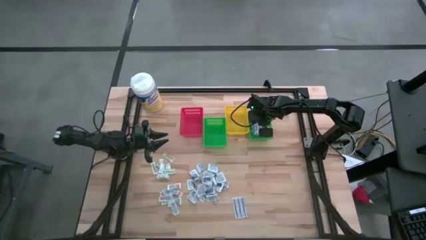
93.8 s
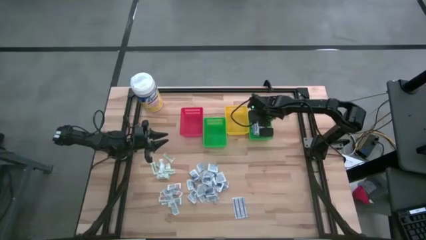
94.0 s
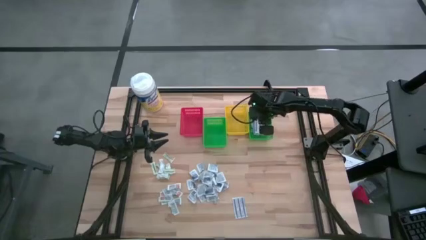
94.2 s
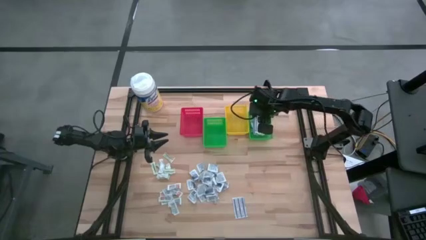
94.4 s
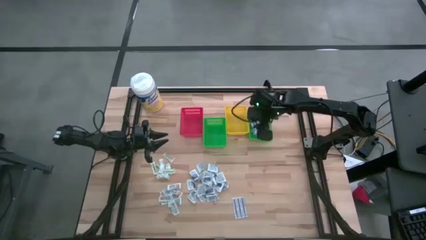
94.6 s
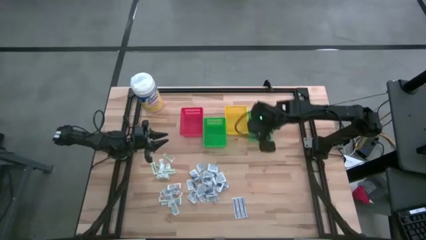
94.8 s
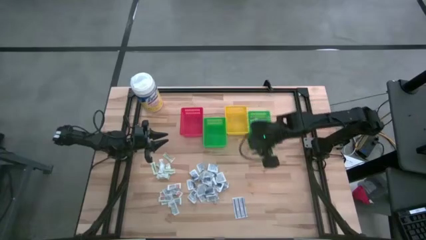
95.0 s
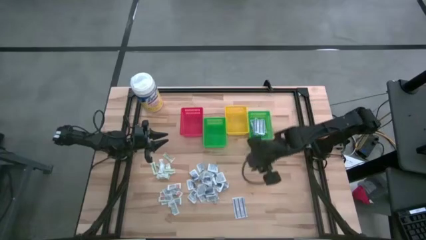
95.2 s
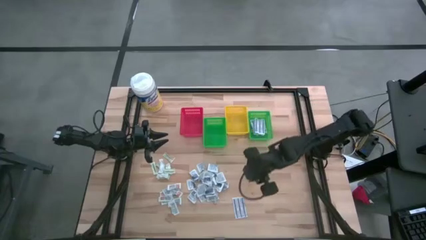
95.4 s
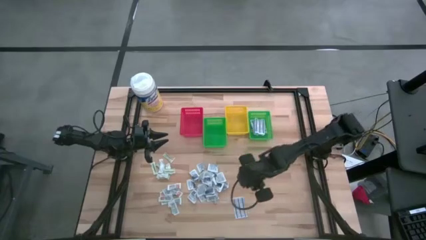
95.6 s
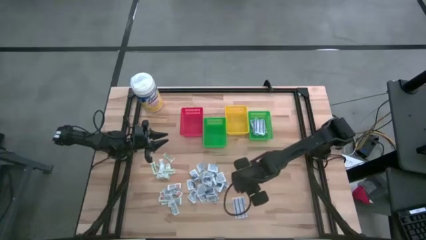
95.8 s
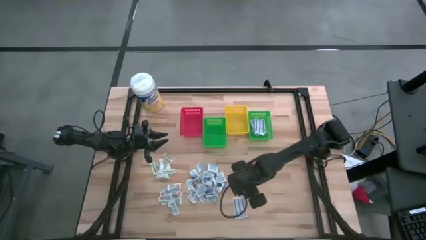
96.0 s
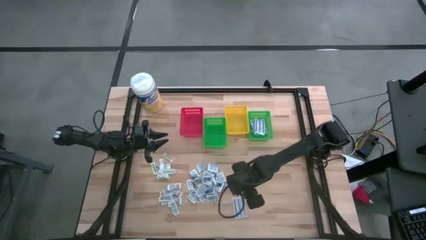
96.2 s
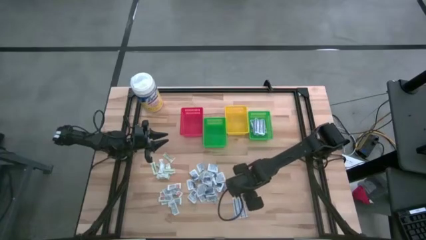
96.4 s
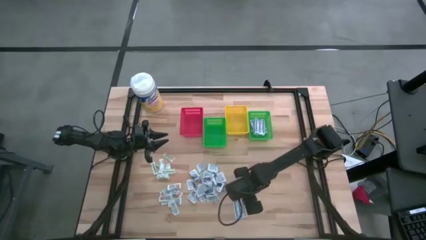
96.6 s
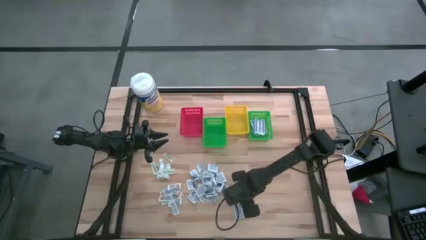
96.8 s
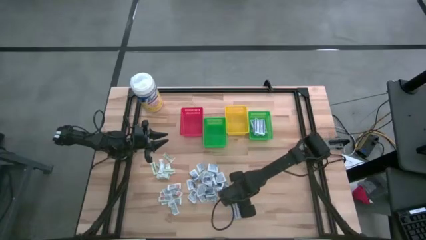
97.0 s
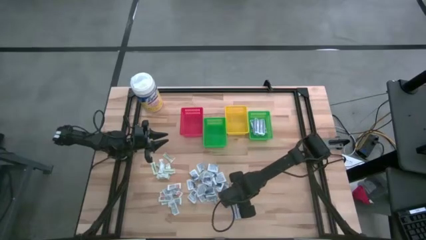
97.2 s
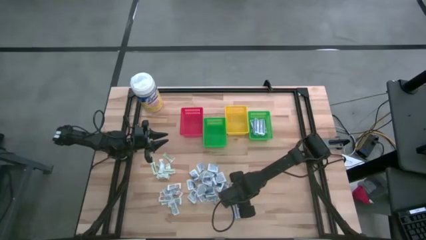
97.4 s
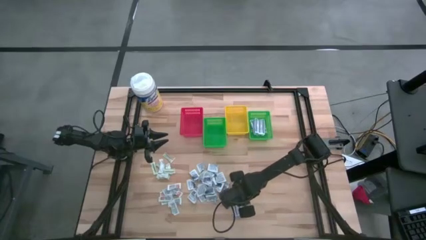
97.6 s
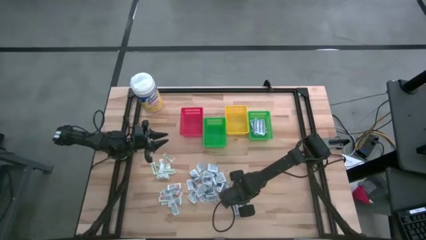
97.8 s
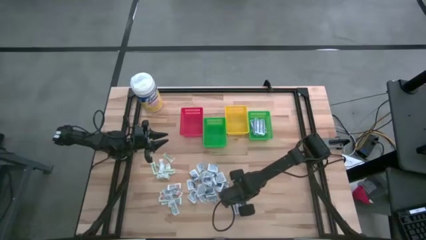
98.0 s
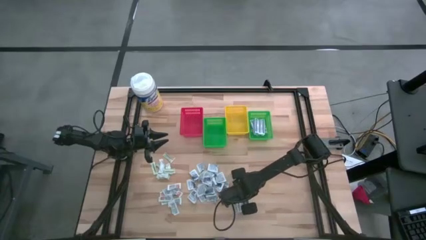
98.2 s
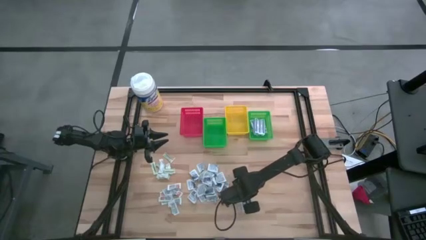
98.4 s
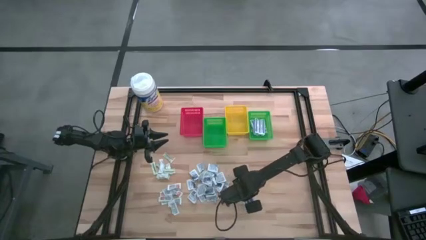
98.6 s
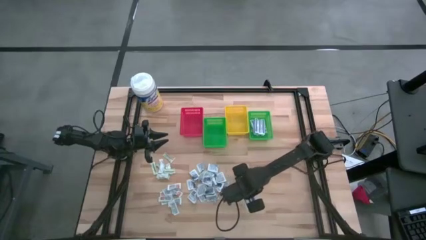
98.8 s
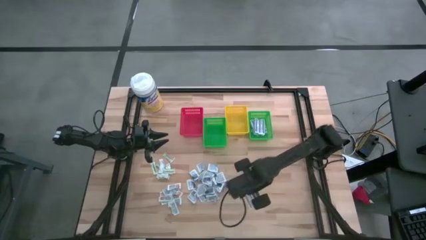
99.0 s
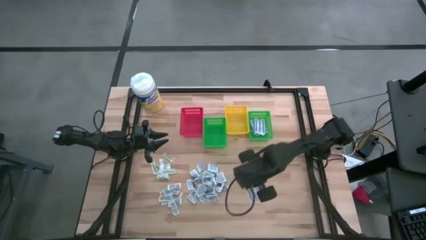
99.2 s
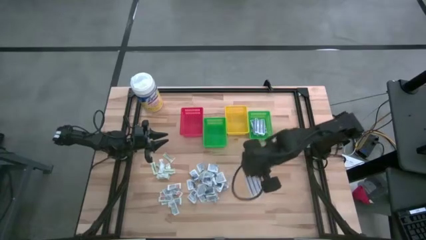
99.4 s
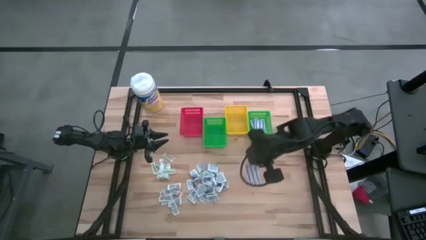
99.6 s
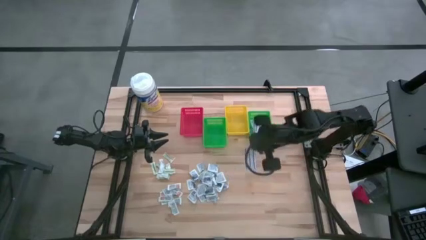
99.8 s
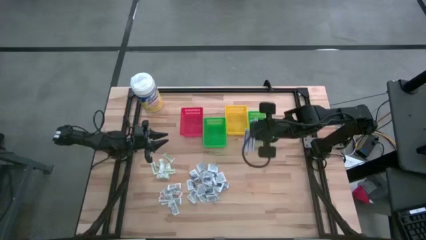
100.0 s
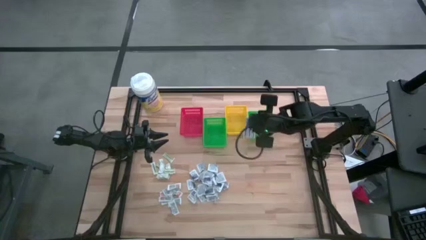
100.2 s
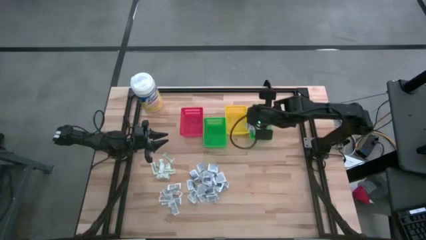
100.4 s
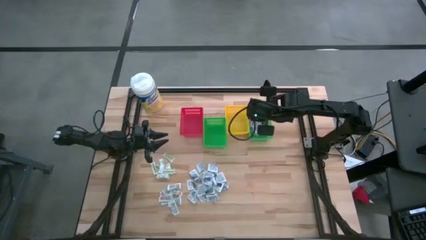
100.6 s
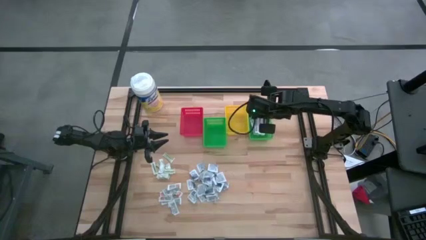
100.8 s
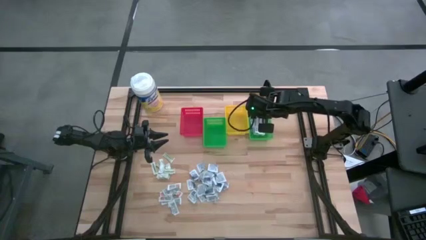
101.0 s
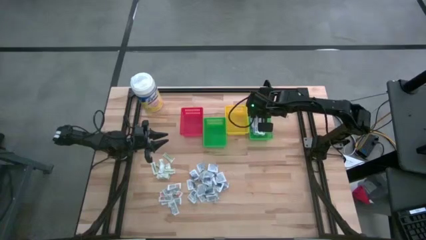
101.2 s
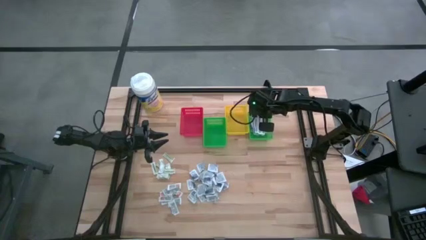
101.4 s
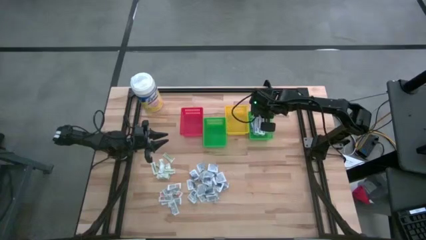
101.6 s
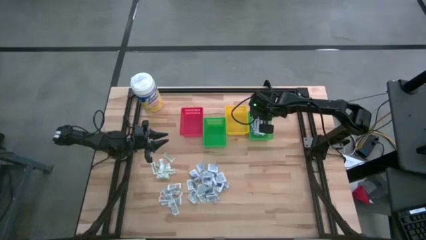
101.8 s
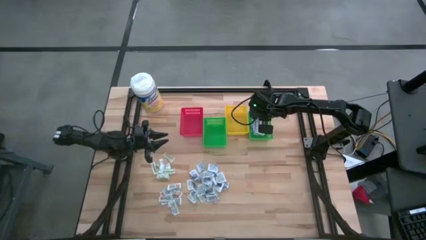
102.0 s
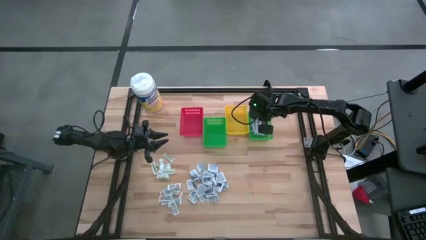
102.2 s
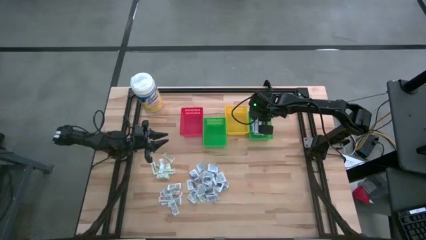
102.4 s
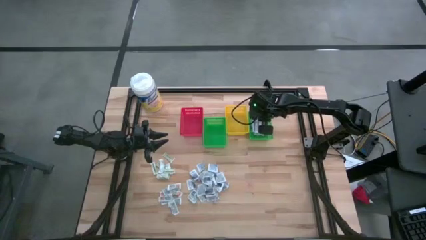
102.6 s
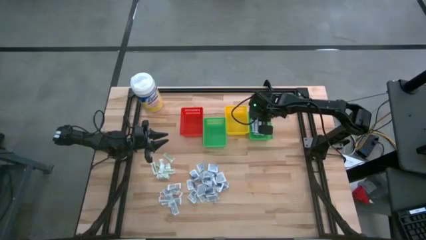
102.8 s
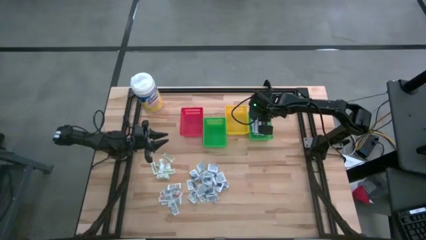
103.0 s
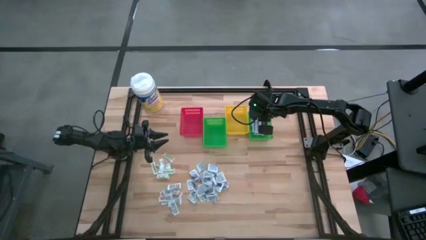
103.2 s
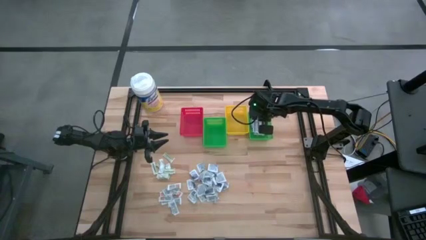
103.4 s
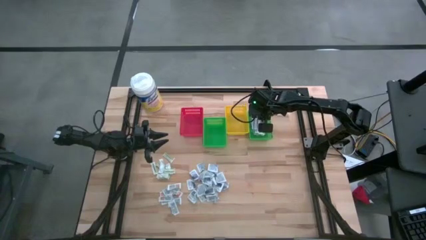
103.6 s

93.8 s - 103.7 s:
Task: Pick & Place First Aid Supplies
Put the blue bandage into the right green basket

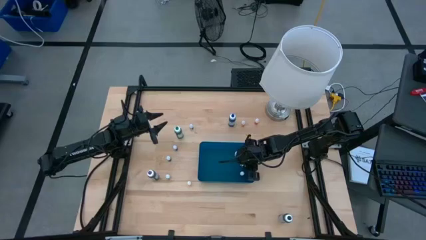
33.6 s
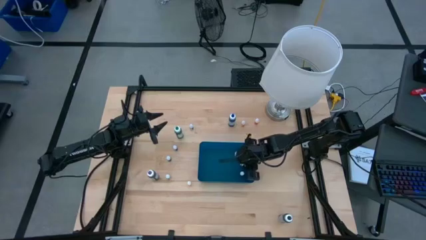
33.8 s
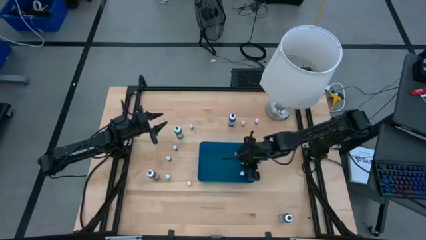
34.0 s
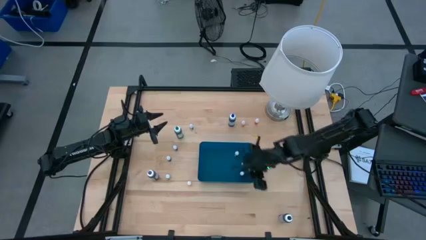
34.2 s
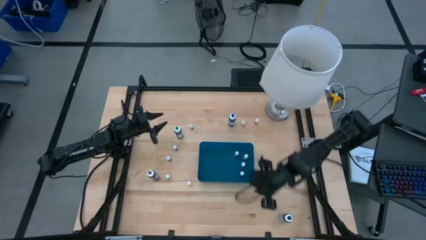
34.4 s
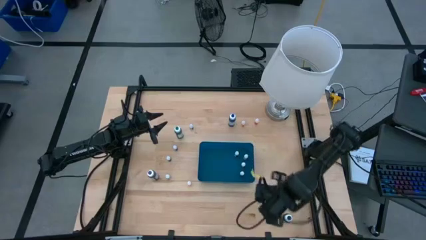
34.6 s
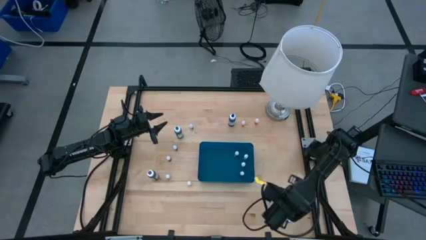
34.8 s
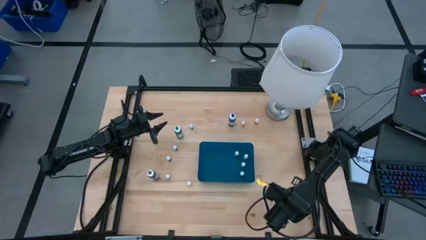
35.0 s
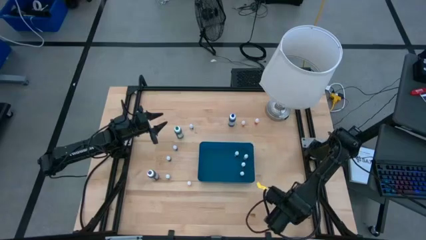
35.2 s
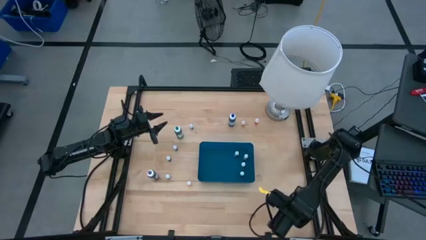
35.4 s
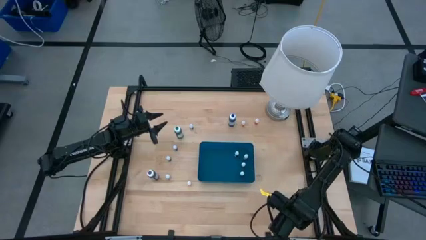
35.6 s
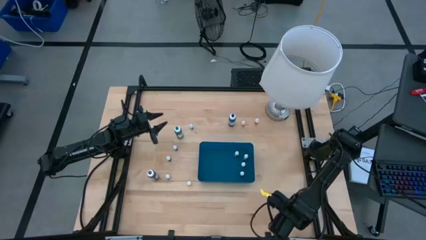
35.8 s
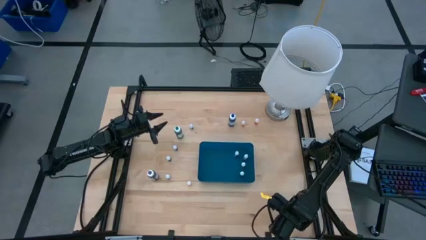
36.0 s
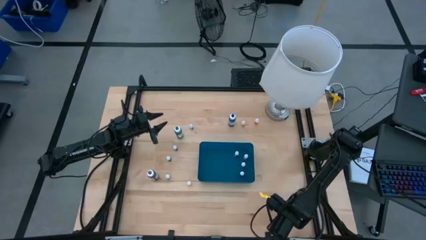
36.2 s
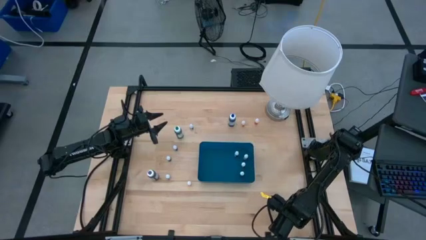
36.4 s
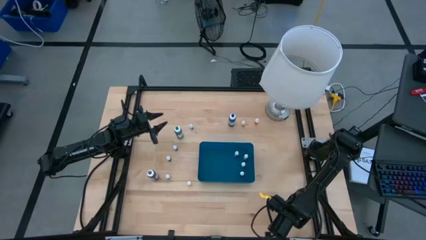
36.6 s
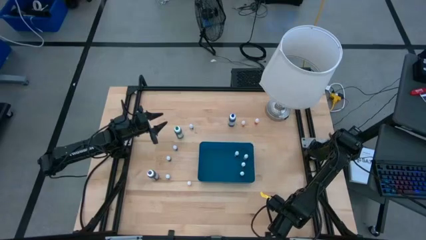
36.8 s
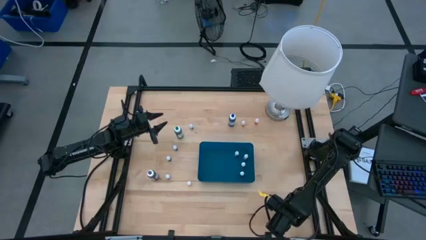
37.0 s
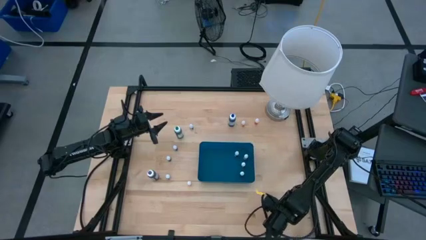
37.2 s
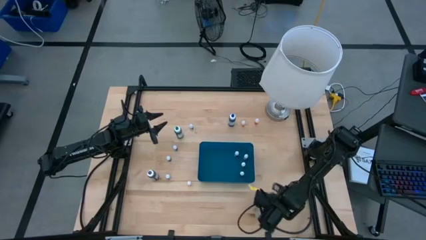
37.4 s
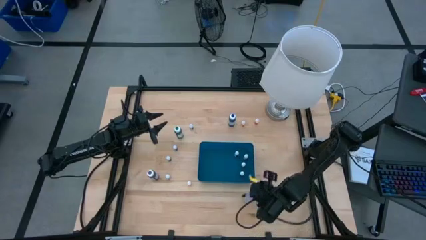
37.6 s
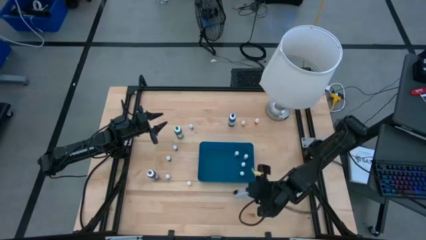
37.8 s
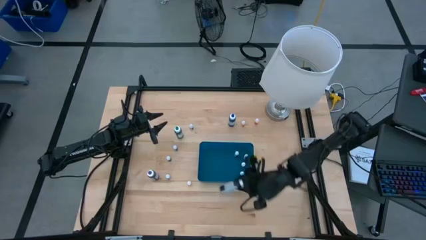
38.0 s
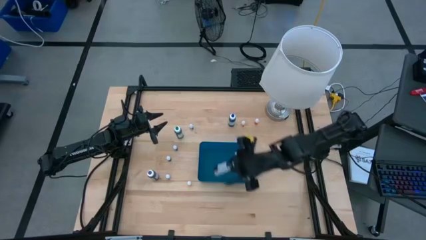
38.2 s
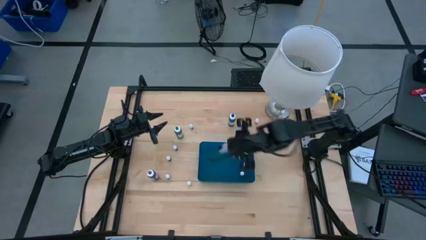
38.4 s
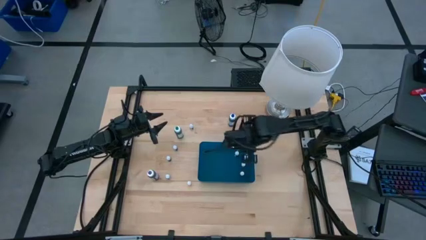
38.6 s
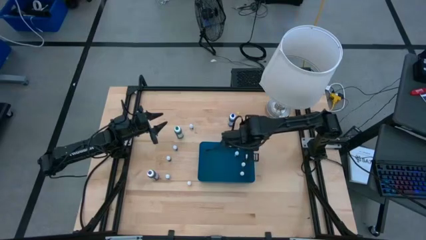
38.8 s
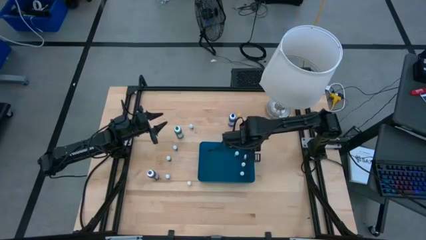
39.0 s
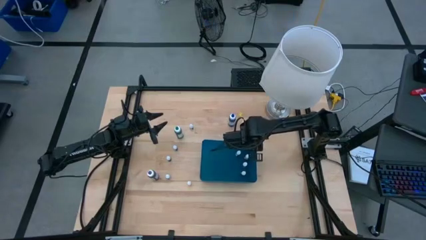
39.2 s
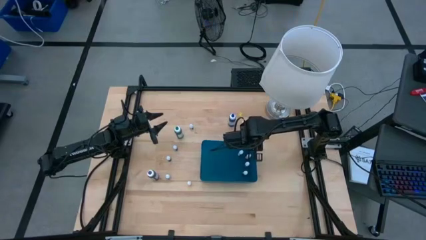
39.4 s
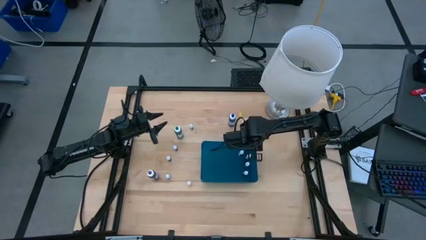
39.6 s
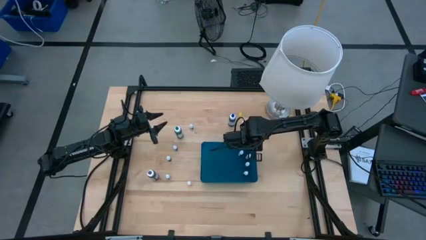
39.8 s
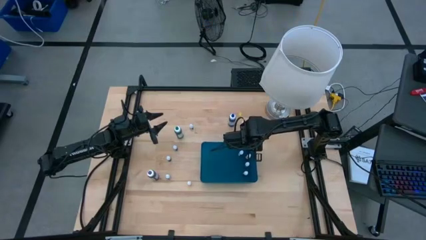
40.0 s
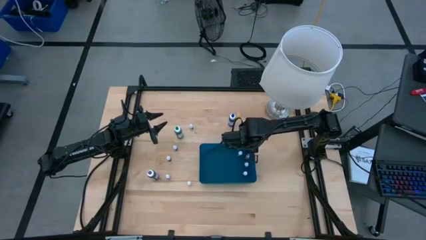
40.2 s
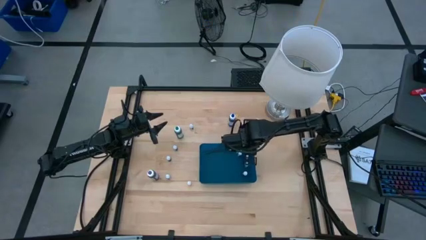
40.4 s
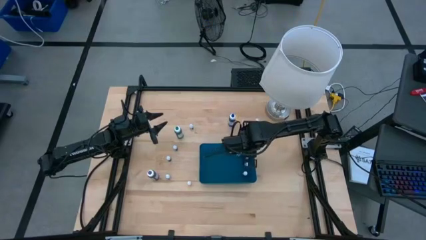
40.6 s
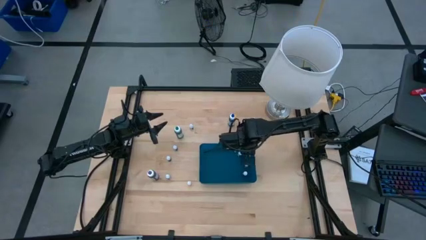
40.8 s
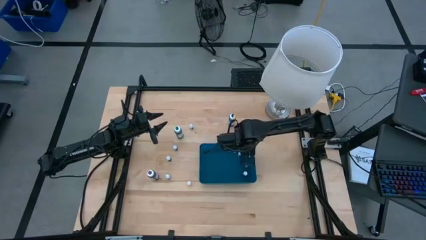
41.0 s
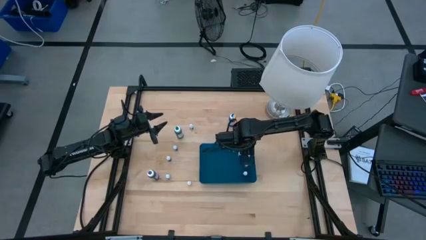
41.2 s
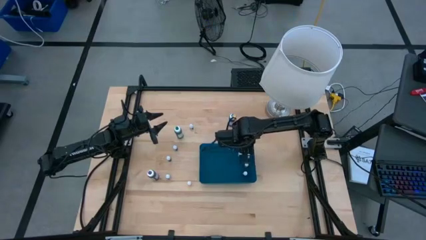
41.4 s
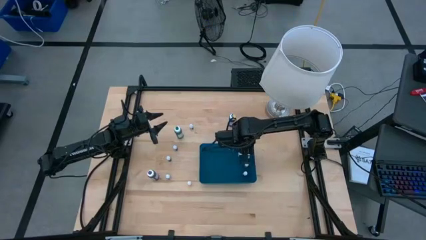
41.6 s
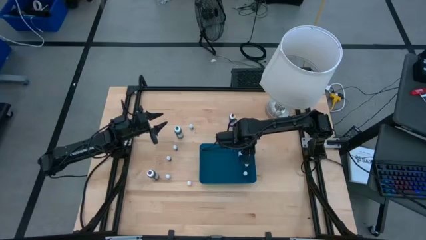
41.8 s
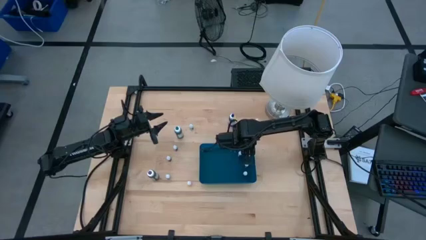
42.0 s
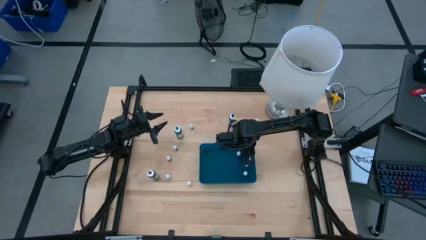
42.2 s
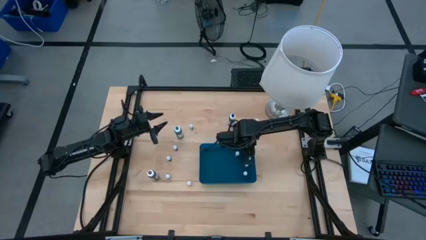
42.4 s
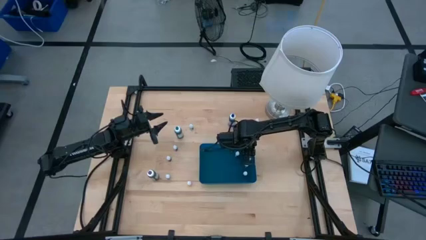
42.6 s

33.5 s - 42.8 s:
Task: Pick & Place food coloring
Put the big black food coloring bottle into the blue bin
